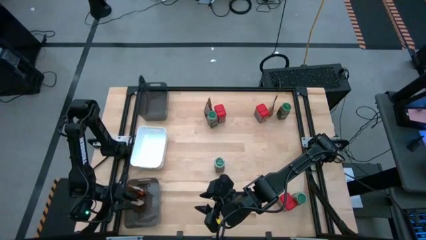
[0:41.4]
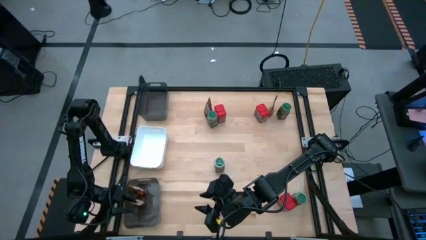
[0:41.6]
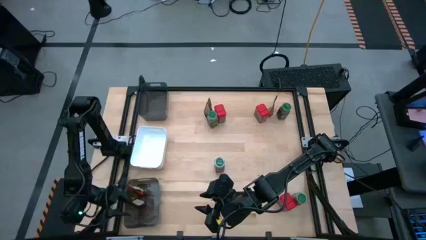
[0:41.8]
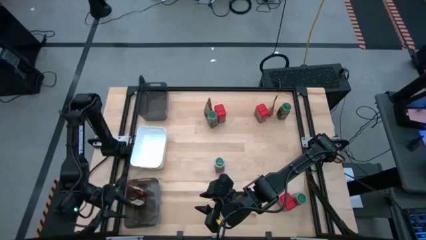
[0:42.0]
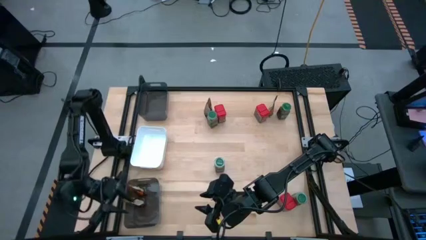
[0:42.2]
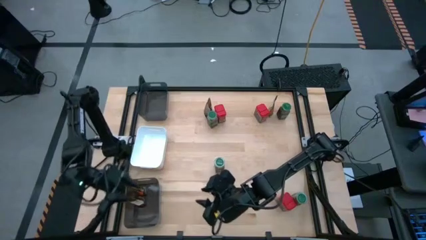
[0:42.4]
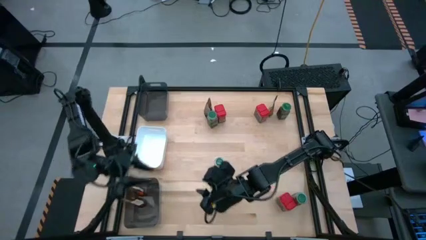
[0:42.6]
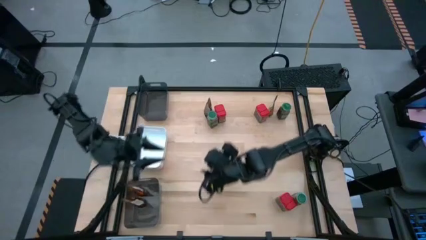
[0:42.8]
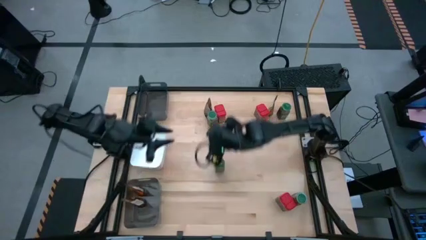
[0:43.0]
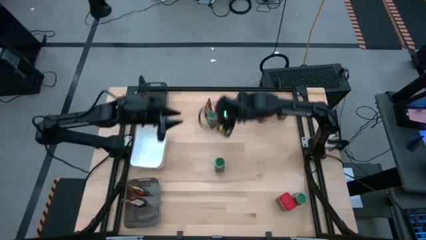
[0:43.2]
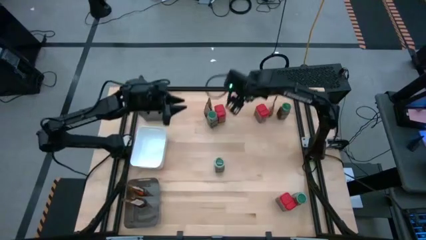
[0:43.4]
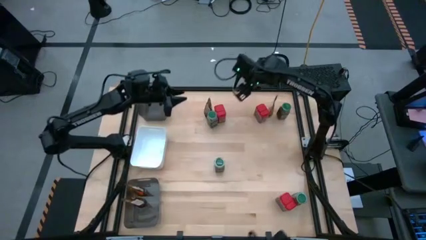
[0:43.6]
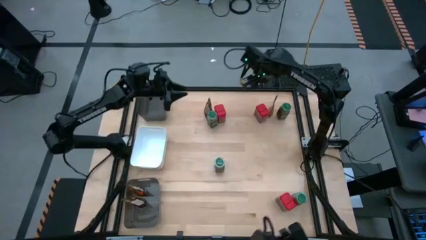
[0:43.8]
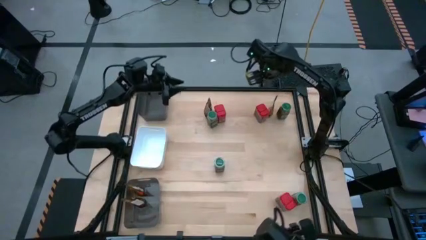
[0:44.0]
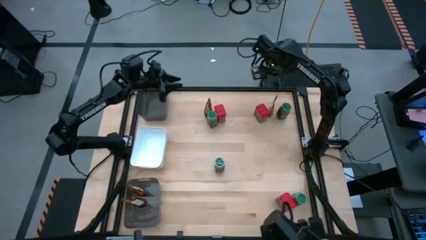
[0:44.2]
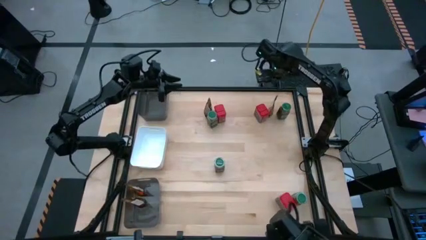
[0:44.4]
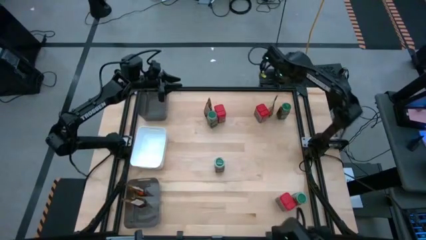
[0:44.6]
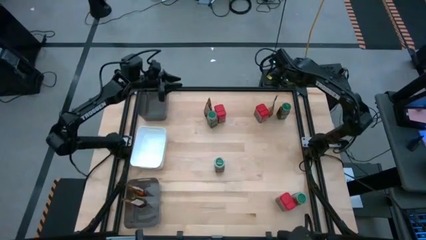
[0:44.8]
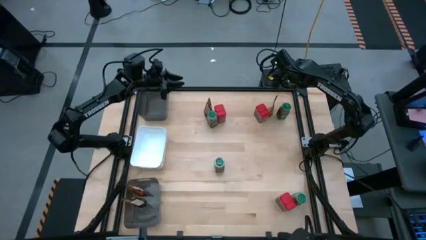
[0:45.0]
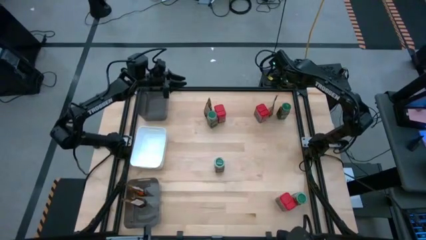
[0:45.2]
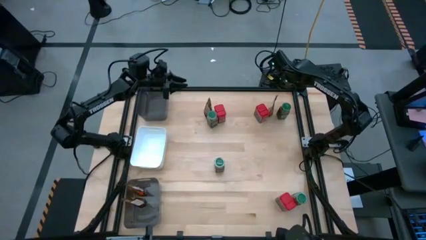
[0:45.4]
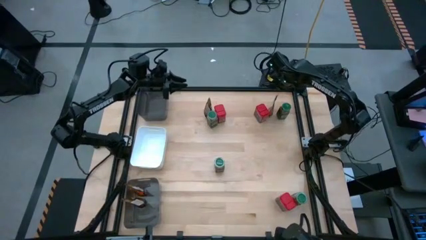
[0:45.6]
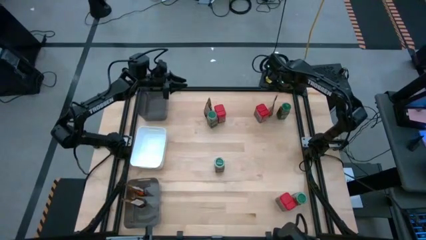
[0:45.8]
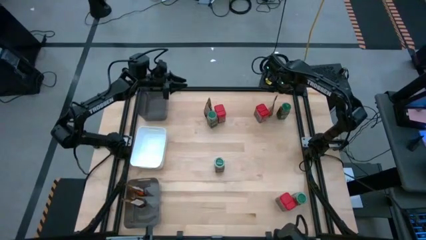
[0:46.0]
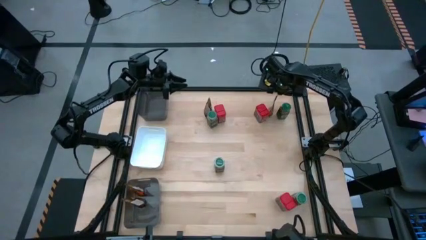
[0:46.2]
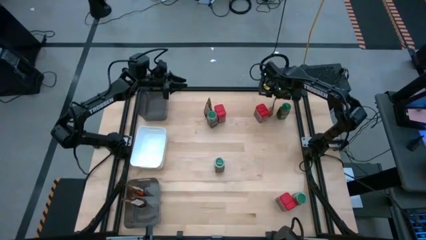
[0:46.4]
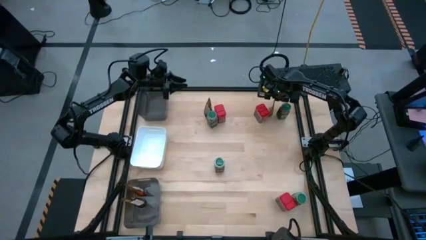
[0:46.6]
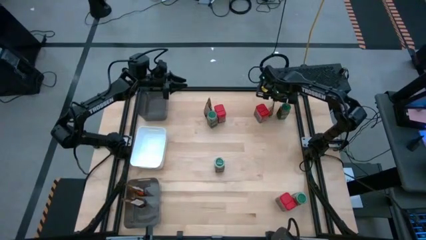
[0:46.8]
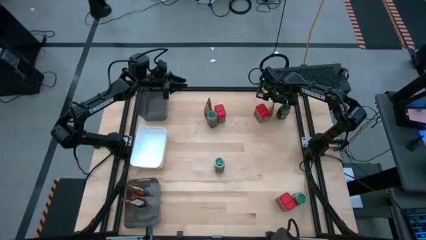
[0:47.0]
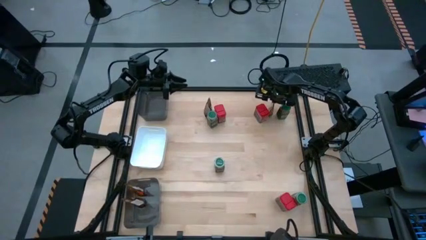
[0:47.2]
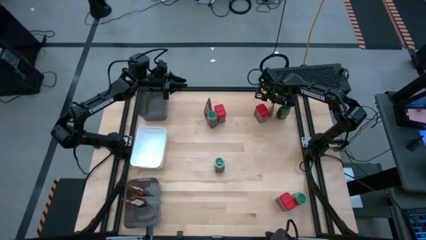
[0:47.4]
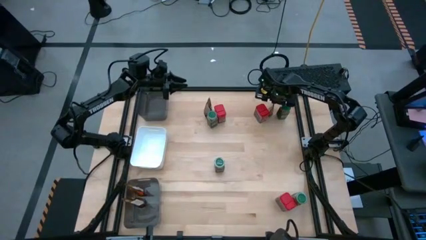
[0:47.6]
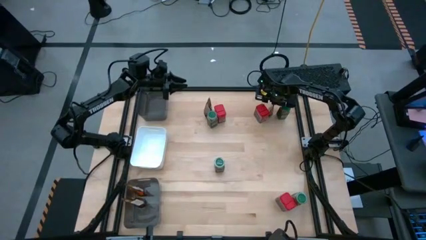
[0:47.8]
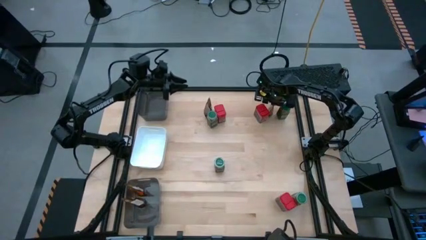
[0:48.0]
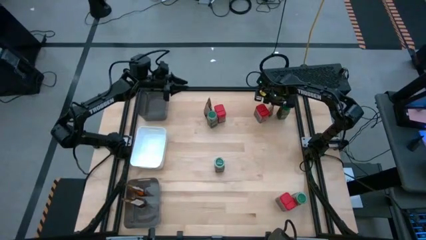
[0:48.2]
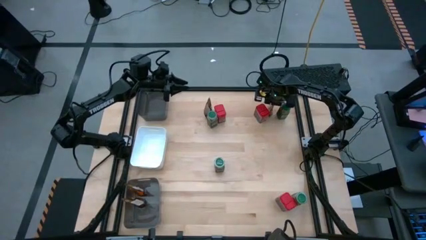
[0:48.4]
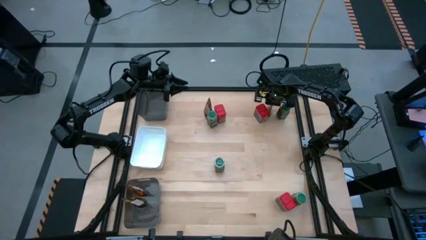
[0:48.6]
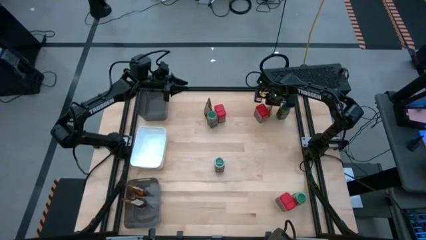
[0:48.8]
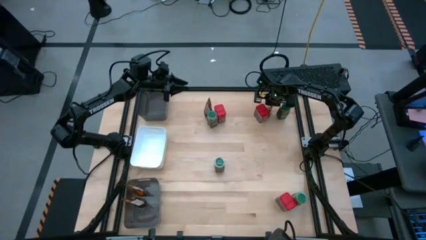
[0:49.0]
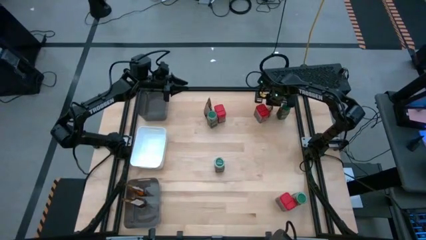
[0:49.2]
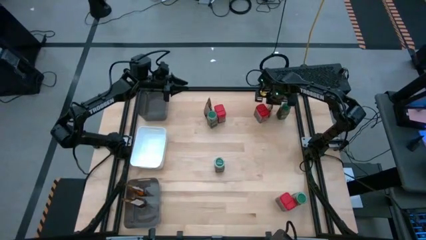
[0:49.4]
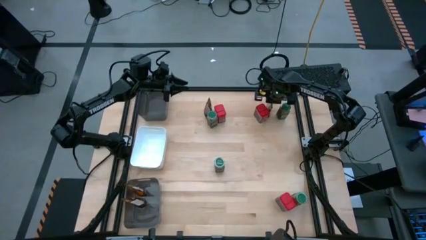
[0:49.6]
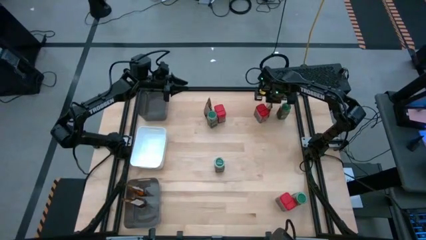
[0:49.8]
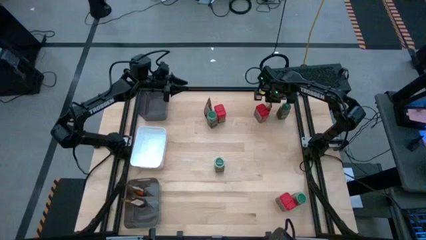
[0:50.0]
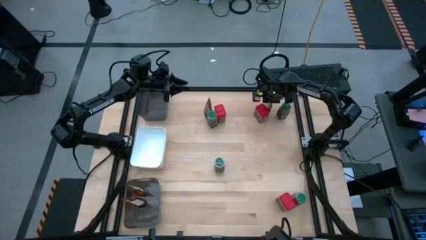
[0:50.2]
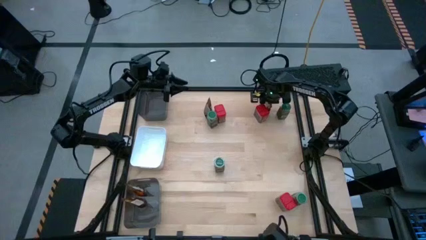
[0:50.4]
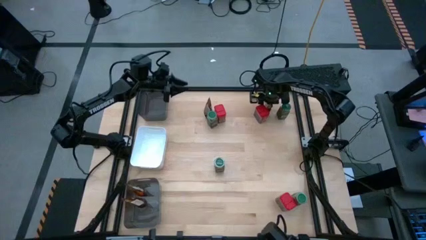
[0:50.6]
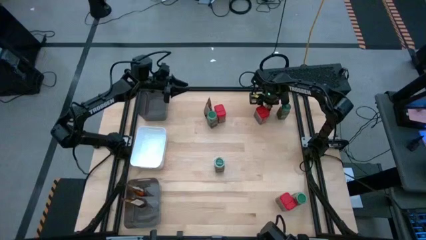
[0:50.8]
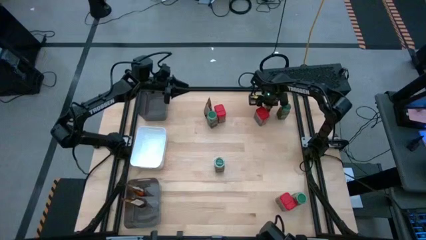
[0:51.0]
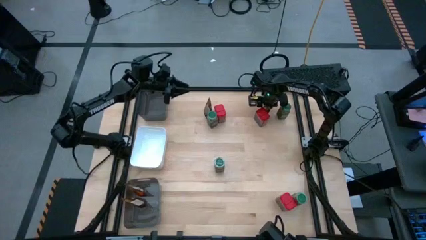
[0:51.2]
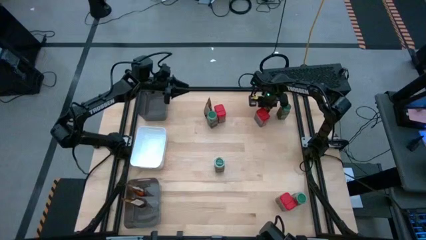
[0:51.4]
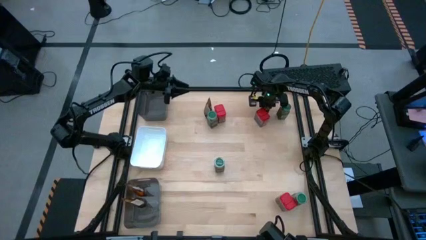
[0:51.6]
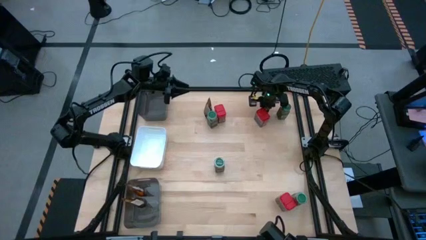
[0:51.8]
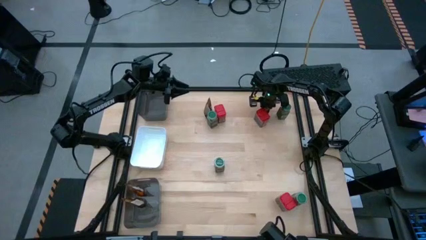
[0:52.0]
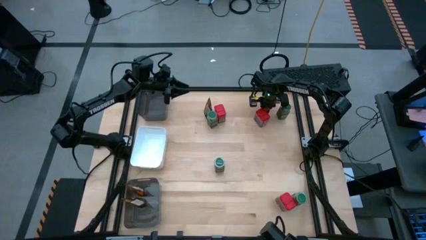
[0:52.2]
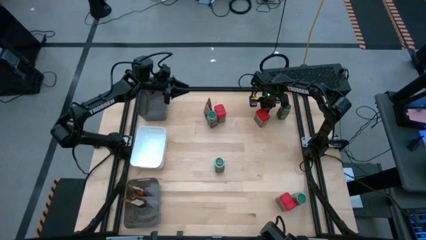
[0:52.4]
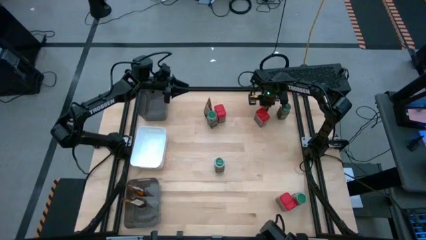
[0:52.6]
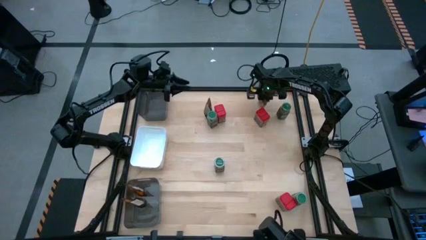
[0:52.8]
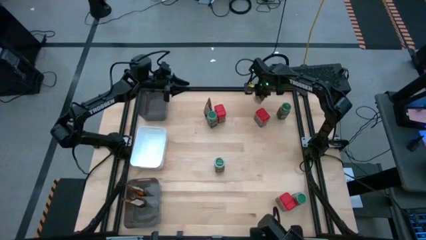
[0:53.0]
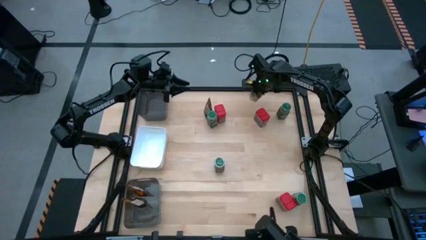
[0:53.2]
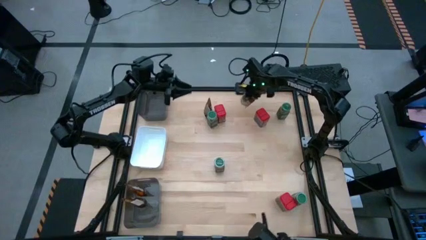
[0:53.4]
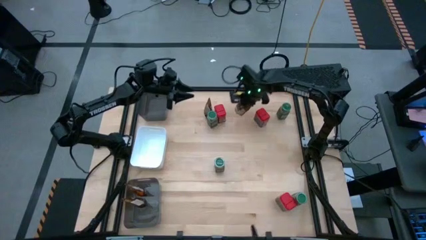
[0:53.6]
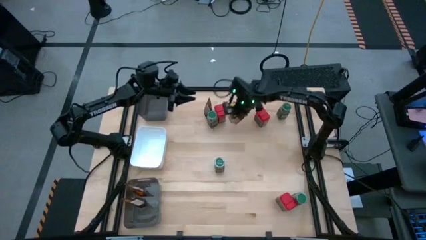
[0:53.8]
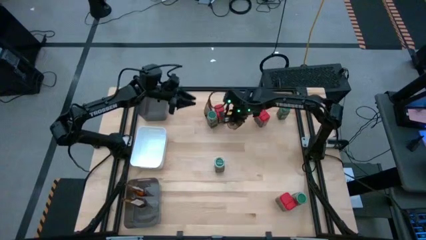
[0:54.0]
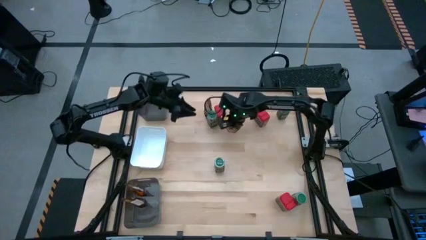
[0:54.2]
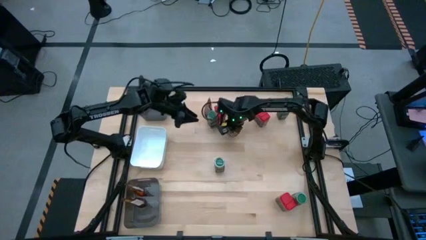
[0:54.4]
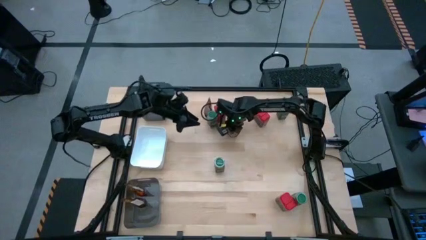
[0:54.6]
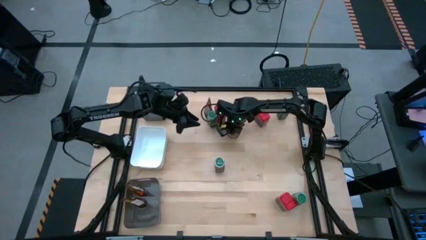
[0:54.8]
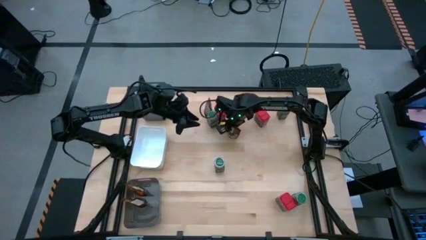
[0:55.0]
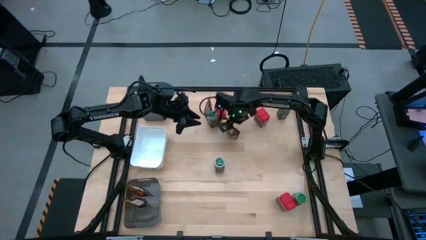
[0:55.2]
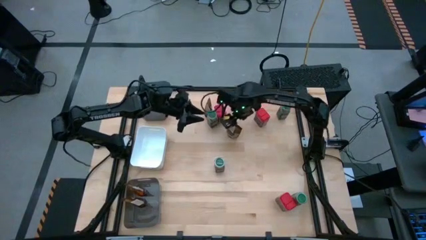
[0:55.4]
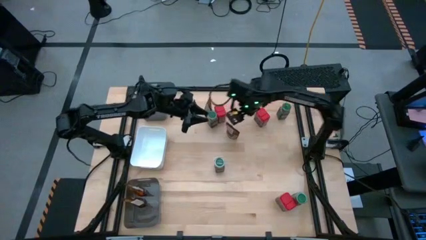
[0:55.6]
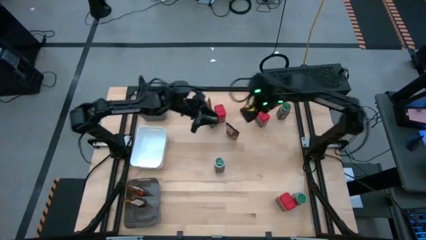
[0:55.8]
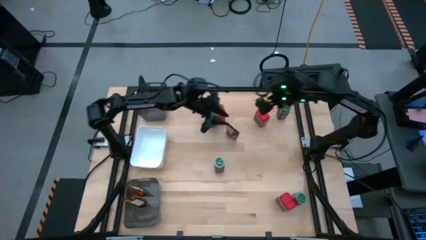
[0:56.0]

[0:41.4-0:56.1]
Task: Sort spices by type
Put the orange seasoning bag into the bottom black bin

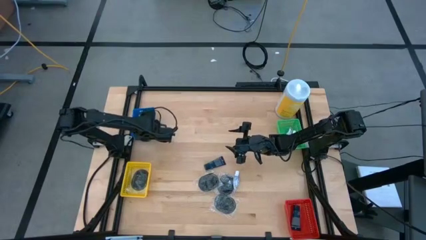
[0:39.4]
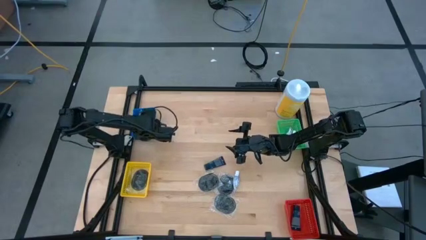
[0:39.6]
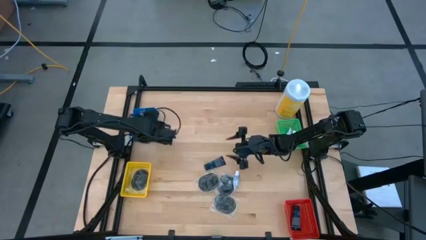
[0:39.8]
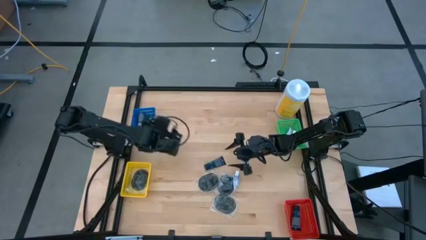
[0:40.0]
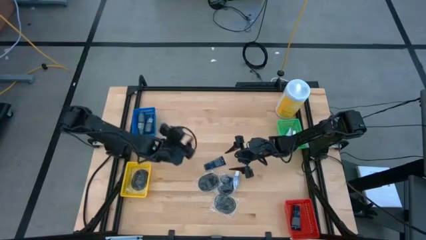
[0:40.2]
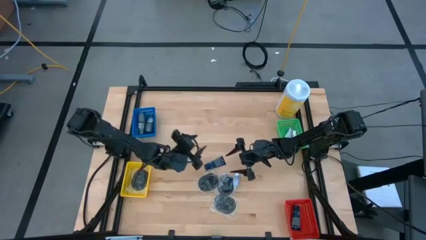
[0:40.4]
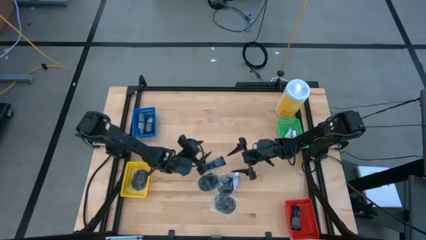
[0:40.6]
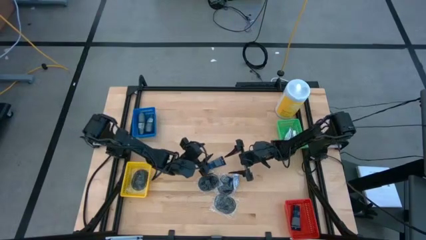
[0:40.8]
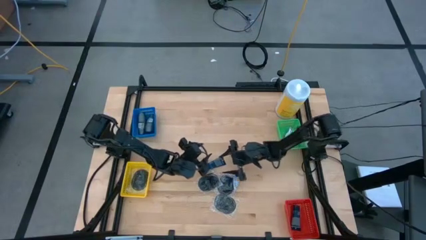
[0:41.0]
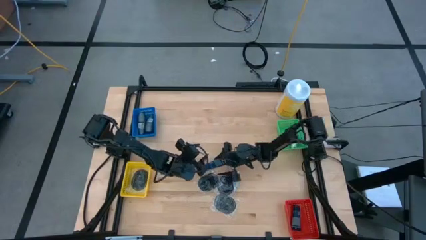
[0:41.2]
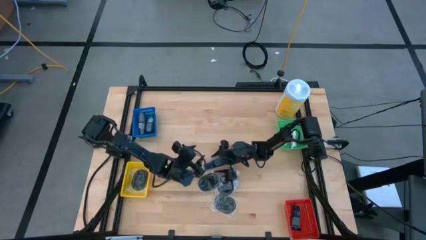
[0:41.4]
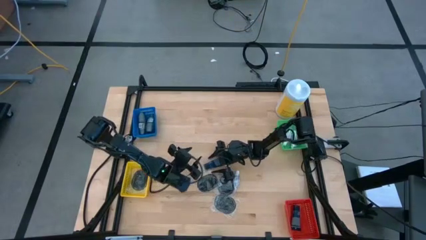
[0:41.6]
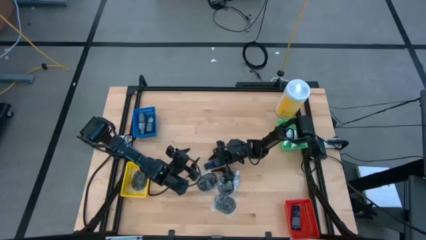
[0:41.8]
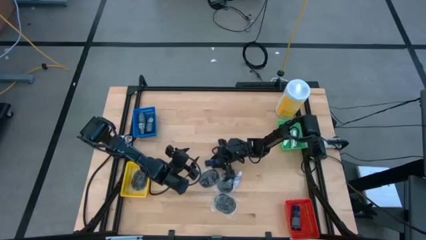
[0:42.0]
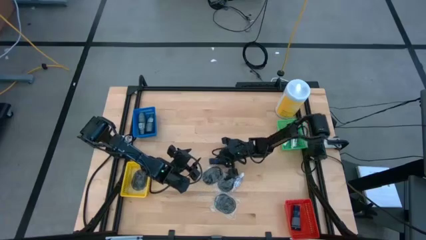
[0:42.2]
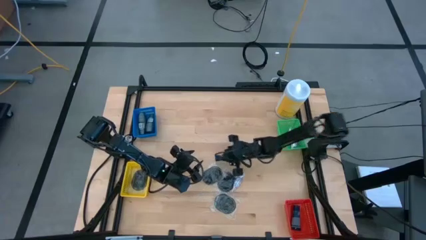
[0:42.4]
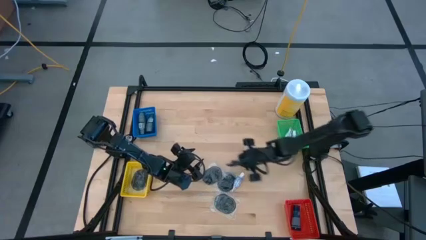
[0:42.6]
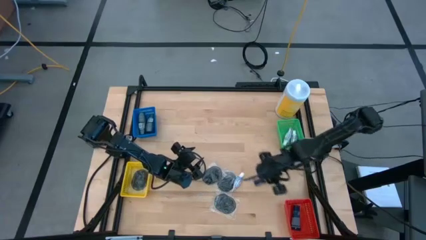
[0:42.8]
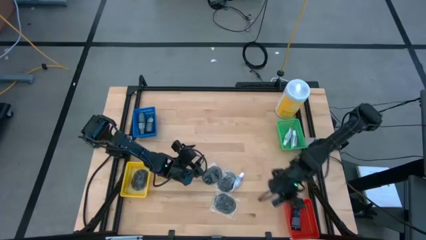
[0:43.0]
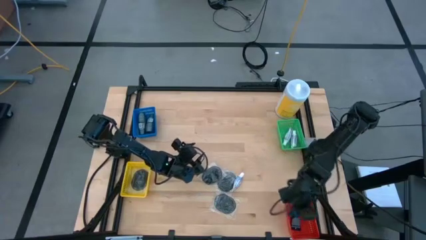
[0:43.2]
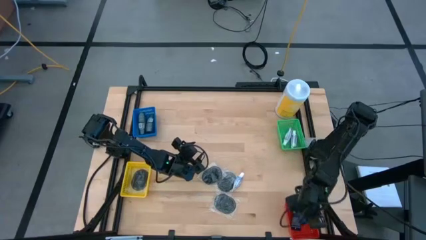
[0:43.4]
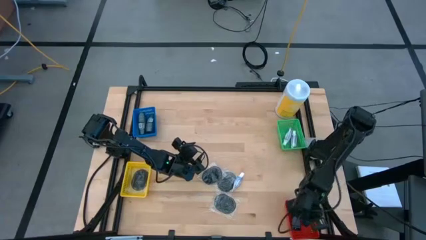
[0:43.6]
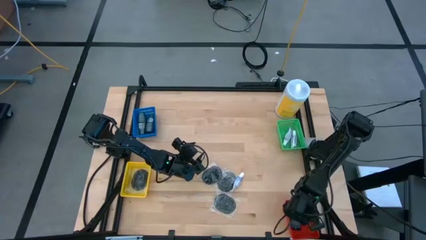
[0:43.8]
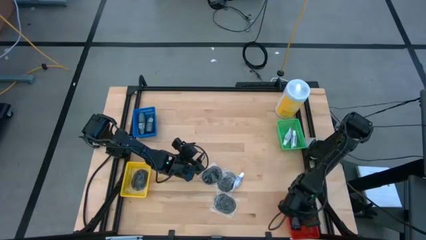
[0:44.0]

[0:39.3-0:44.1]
Task: Pick & Place Travel size toiletries
Put the blue shave cream into the red bin
